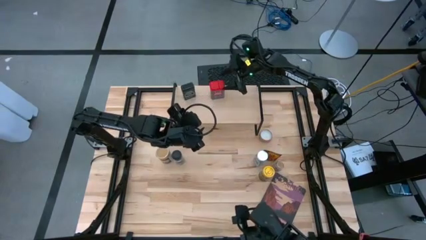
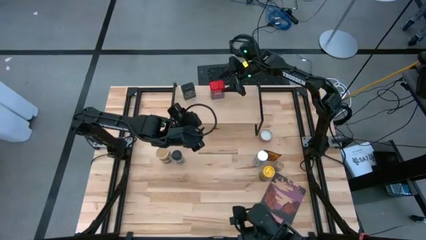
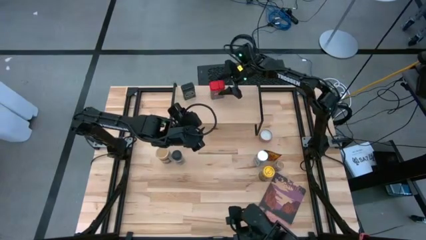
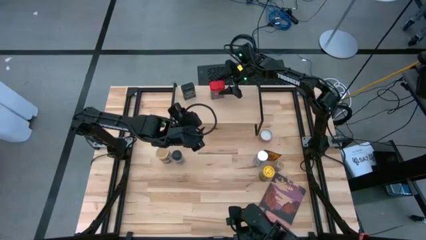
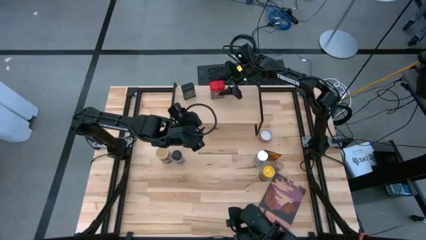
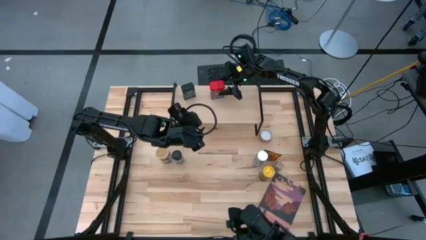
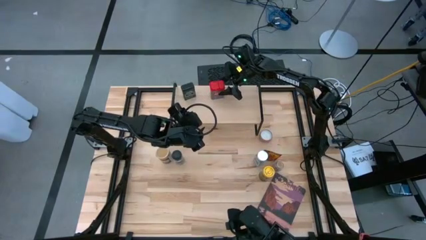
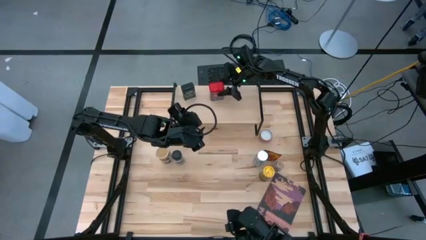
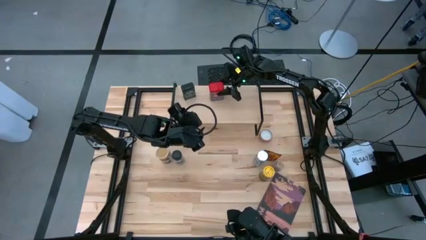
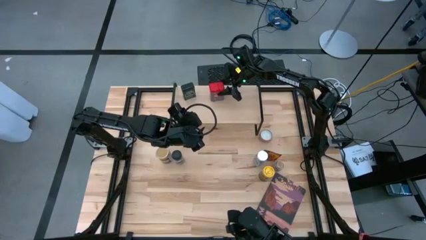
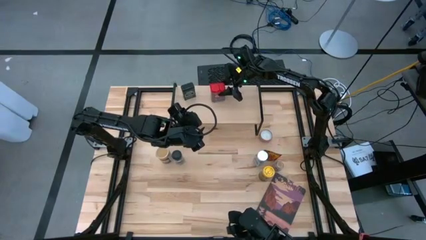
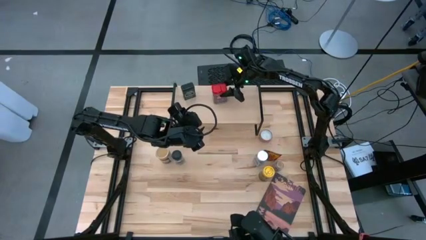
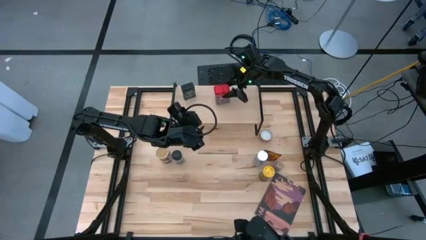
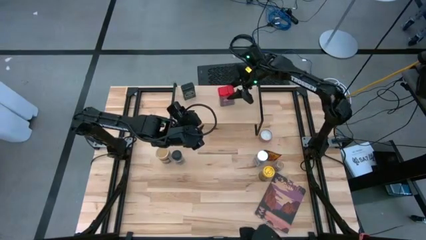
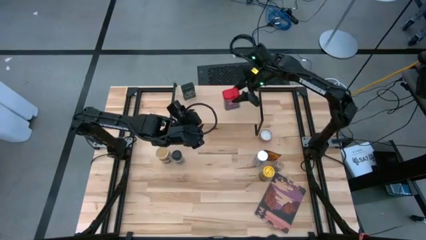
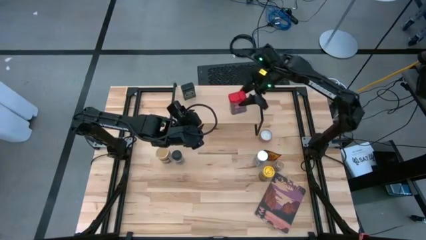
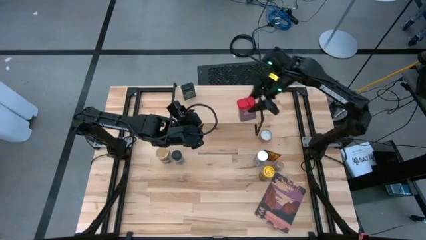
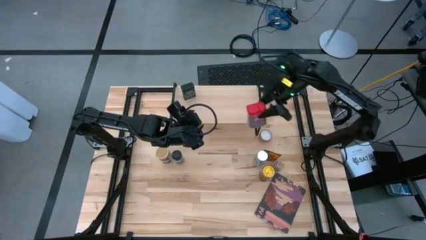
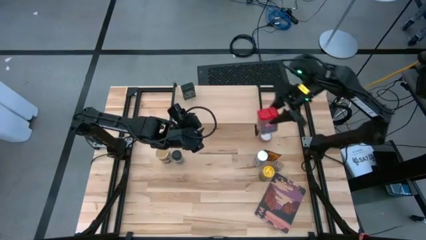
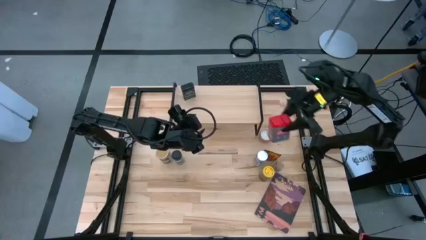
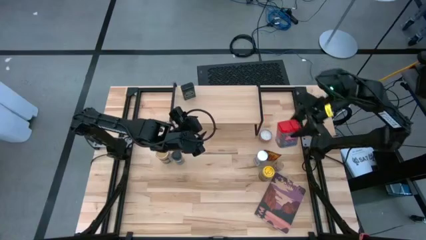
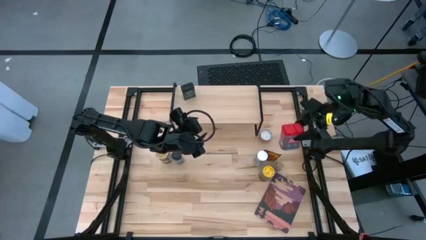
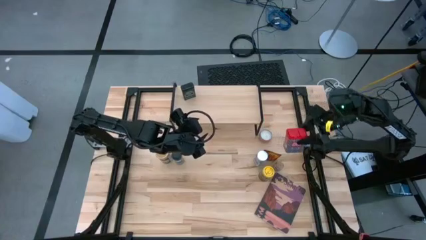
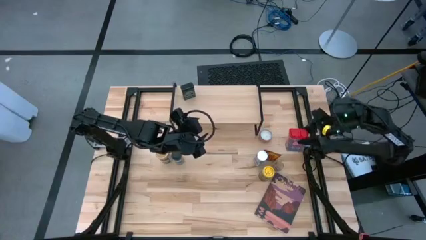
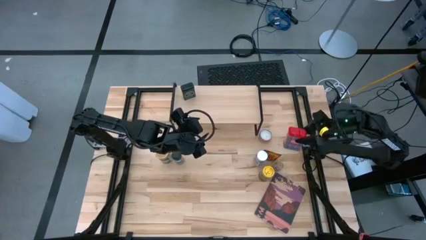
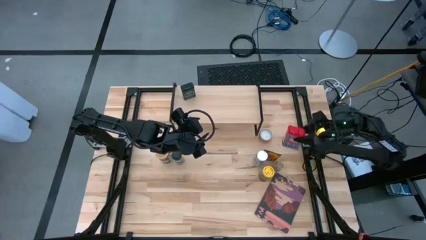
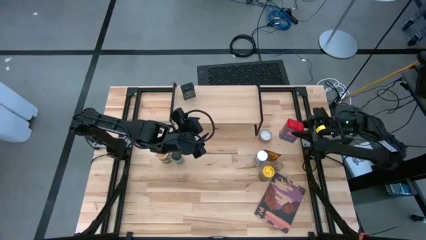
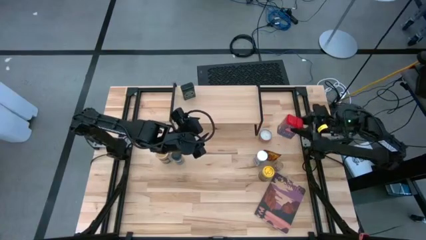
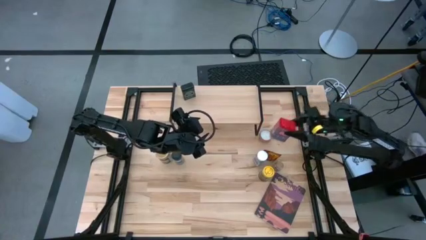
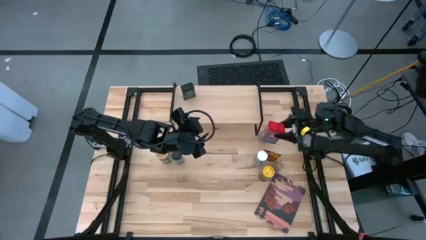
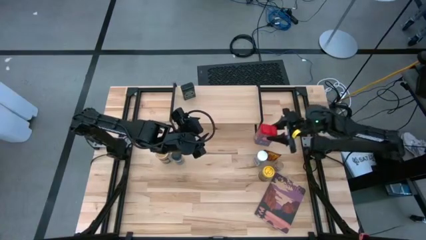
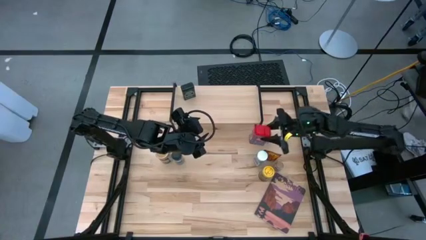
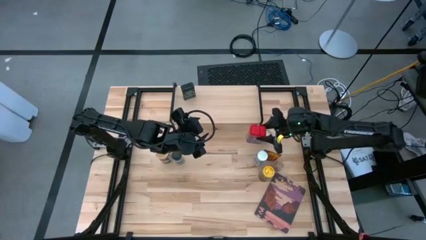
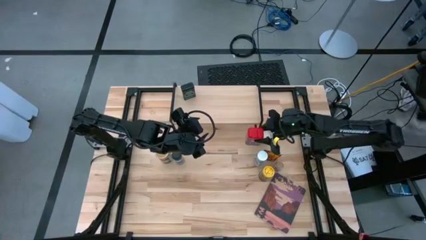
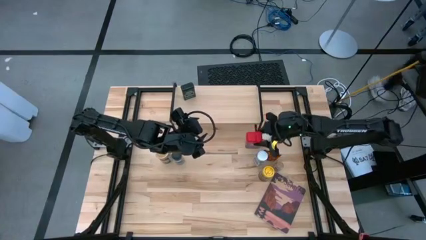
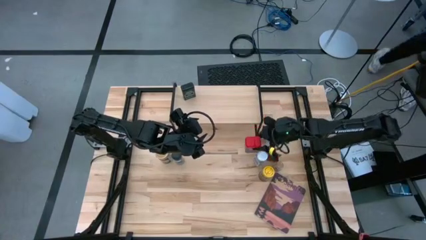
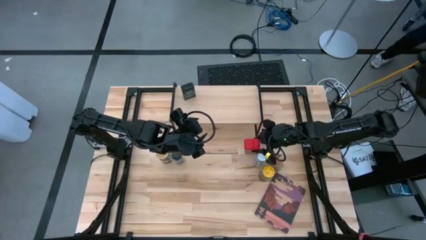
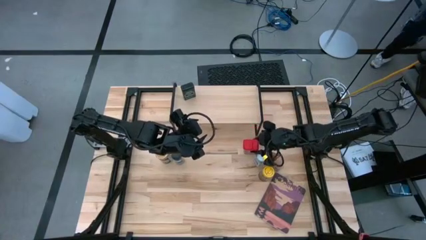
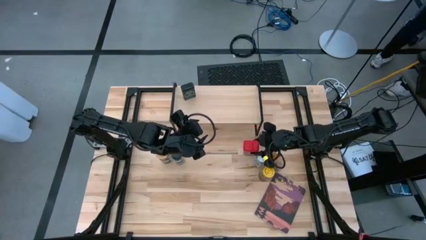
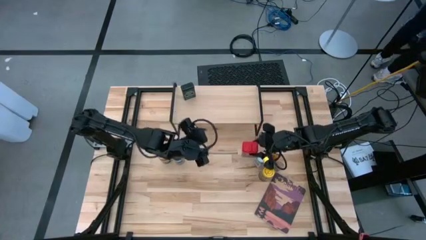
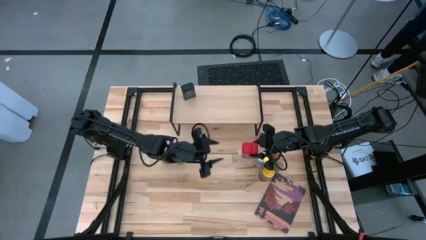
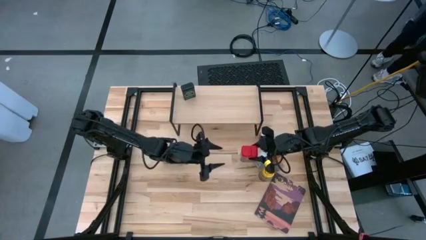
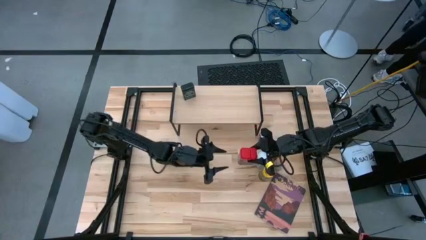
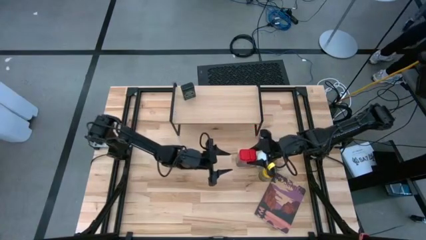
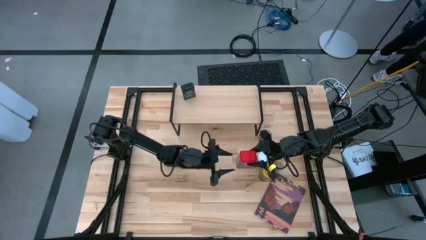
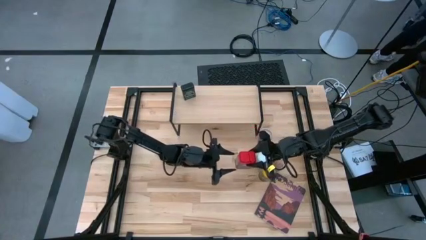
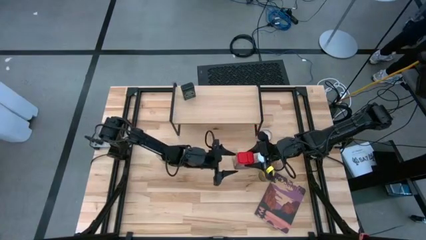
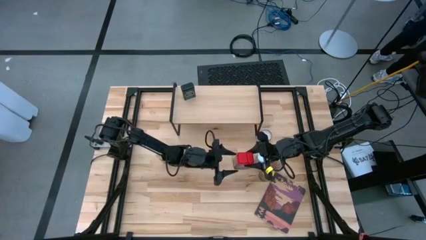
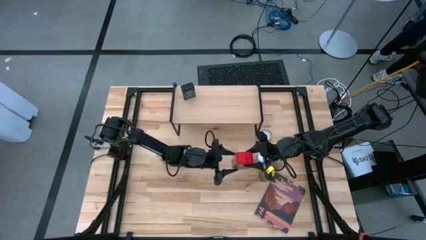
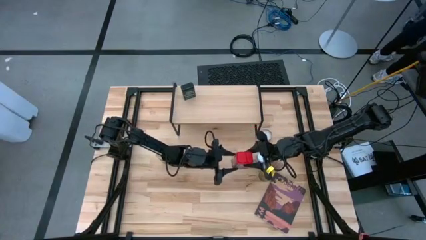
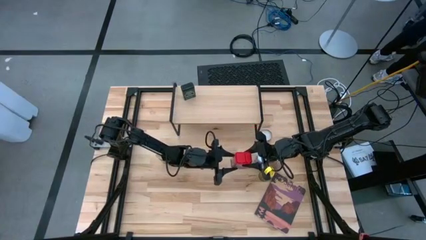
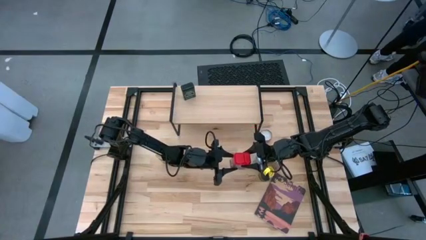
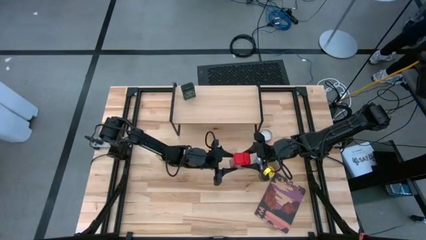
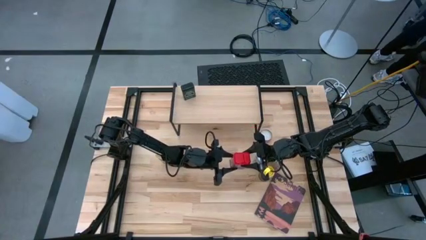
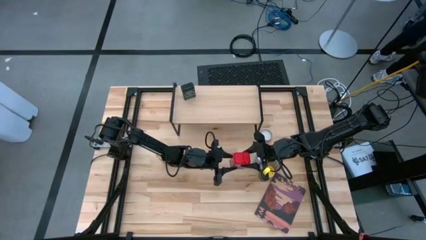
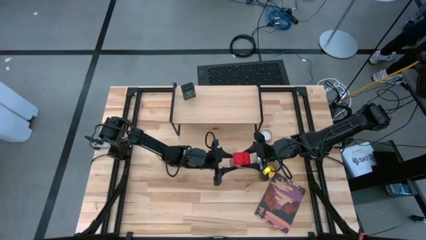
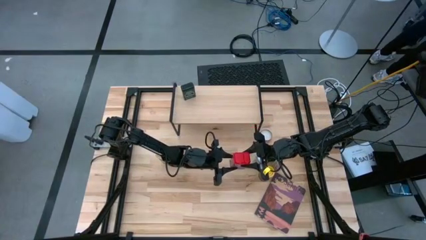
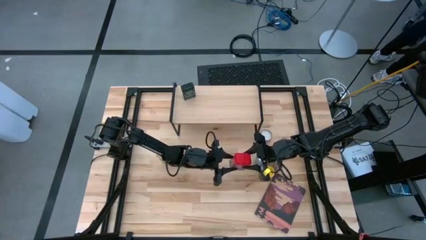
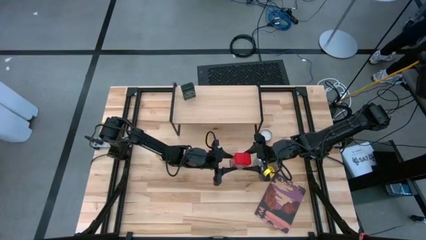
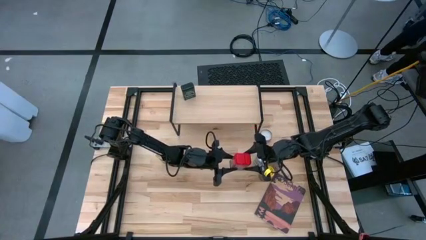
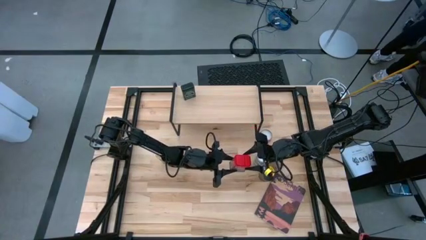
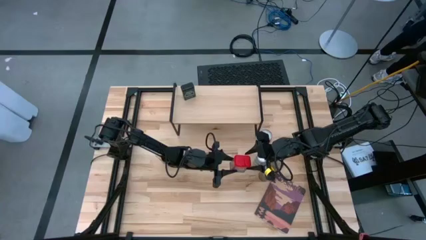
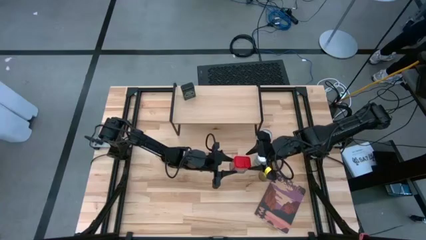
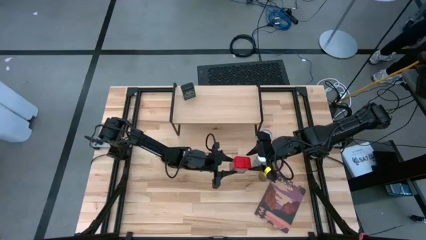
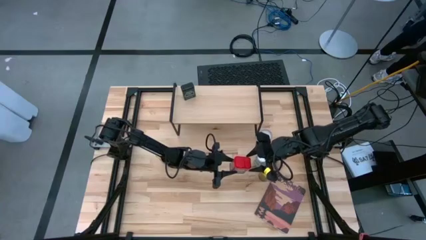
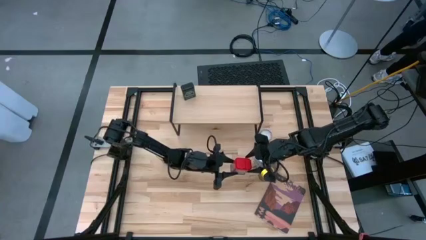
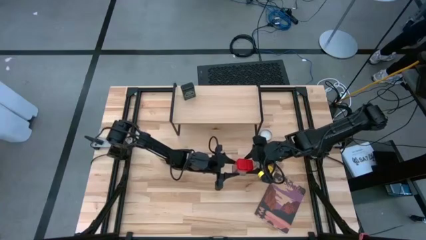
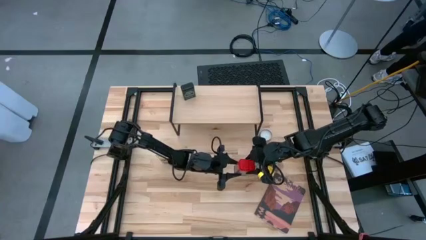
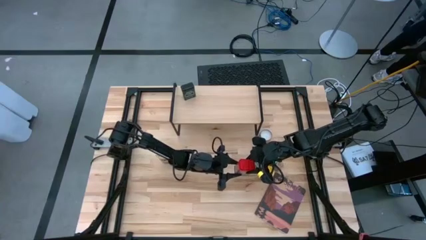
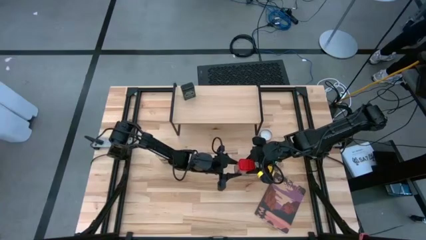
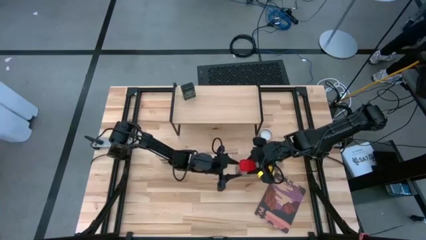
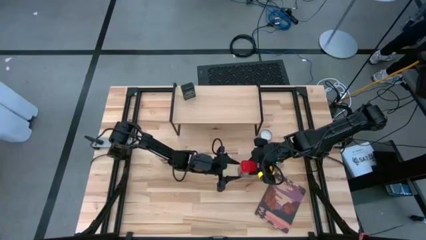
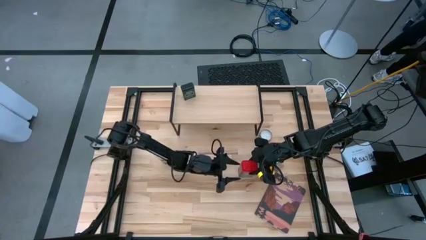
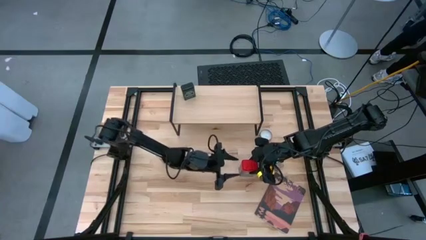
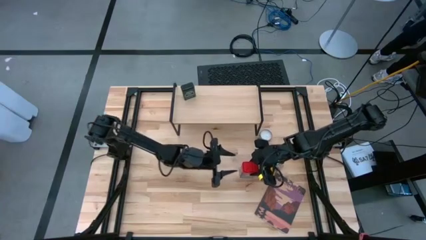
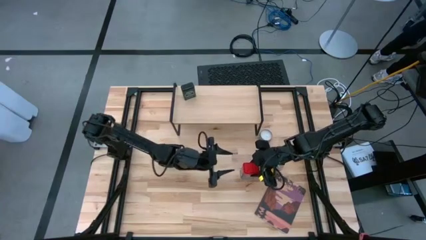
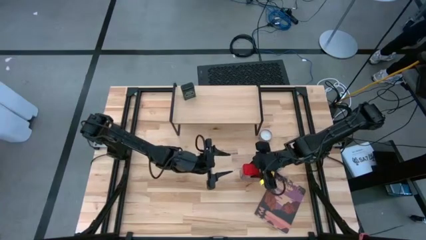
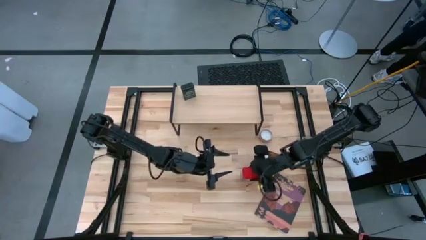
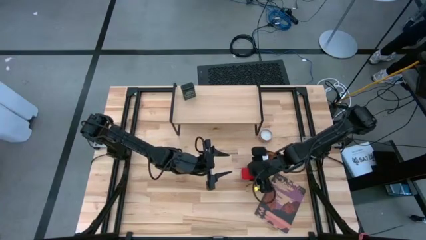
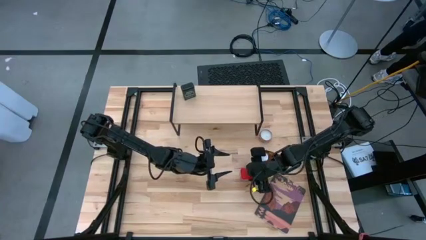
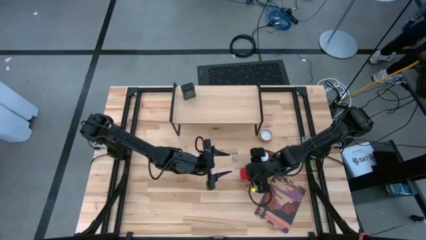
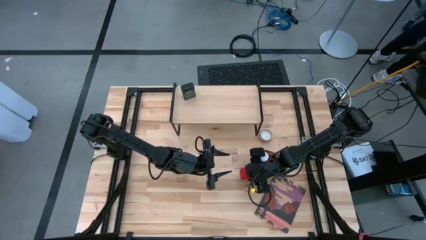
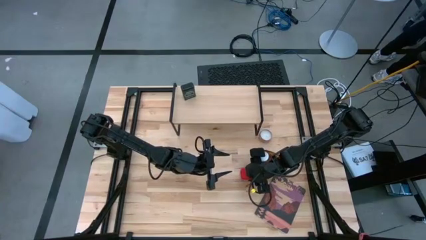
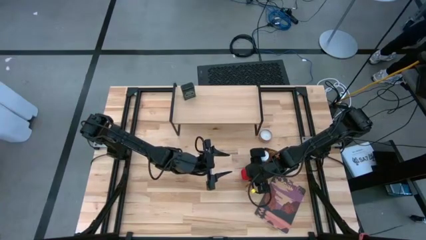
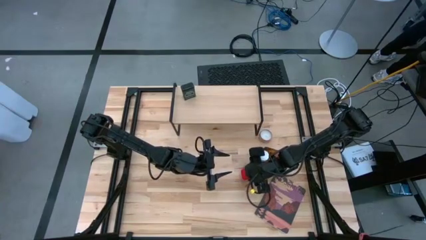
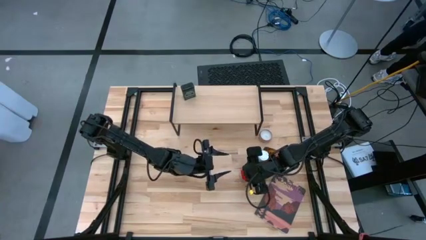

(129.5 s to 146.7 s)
Task: Shelf spices
Put the red spice can on the table
